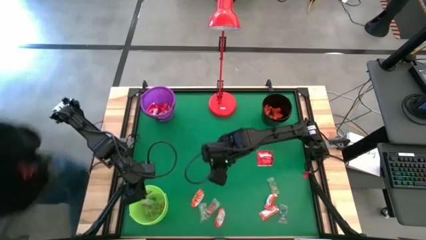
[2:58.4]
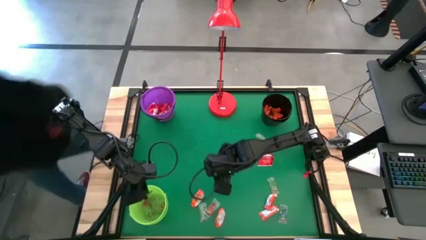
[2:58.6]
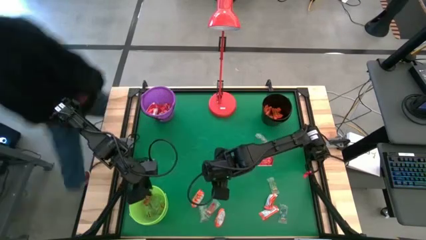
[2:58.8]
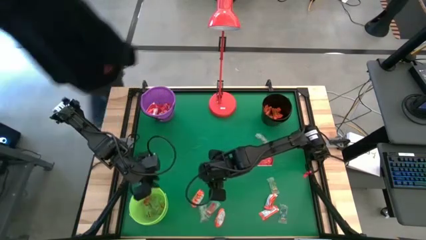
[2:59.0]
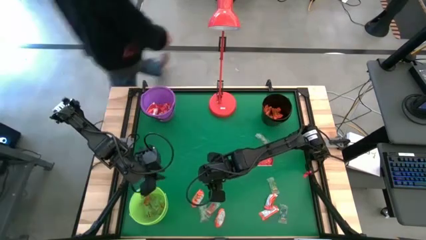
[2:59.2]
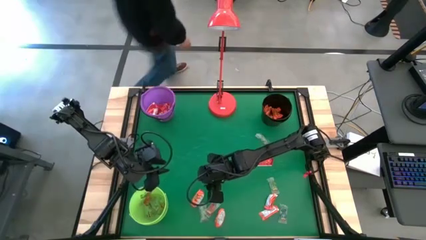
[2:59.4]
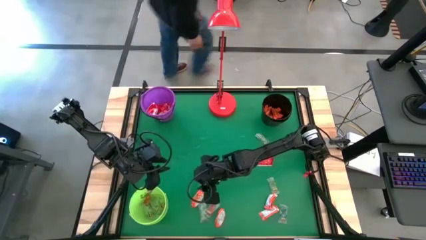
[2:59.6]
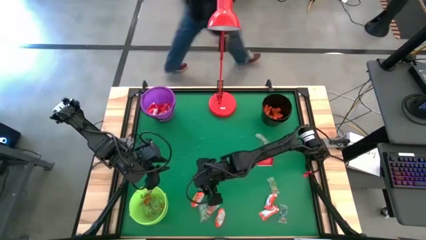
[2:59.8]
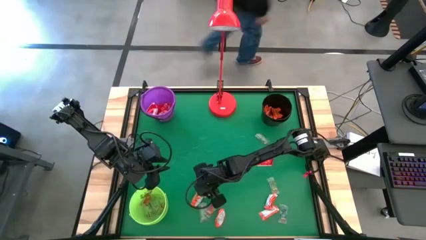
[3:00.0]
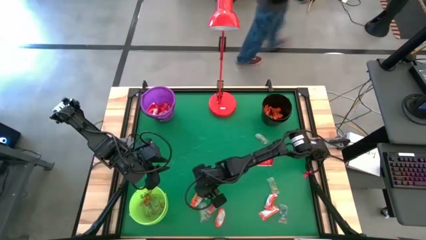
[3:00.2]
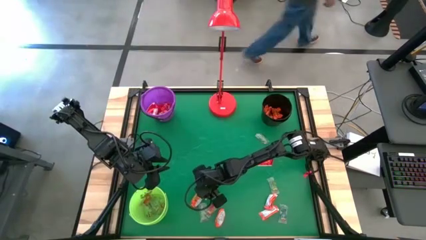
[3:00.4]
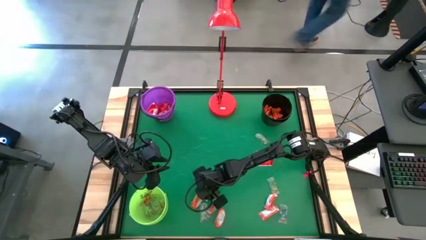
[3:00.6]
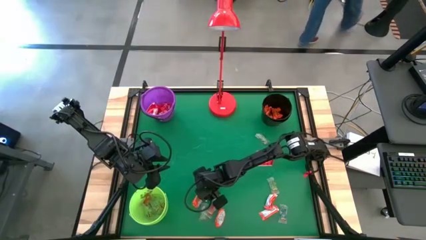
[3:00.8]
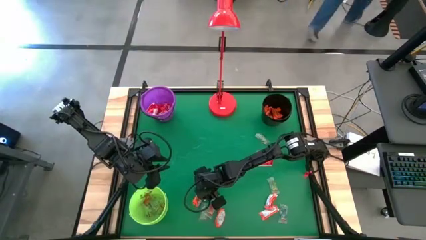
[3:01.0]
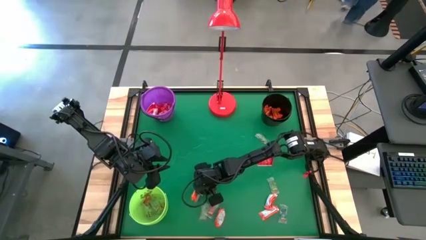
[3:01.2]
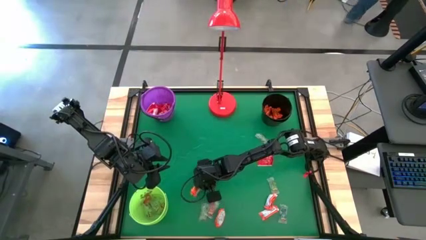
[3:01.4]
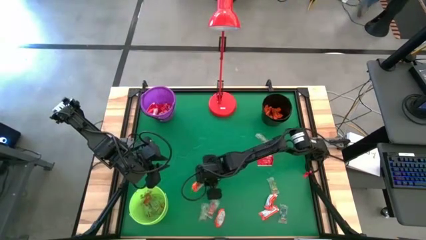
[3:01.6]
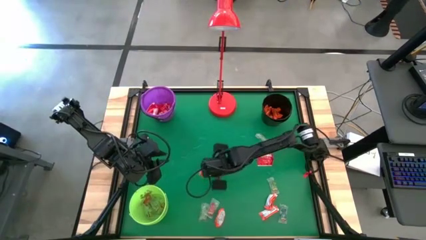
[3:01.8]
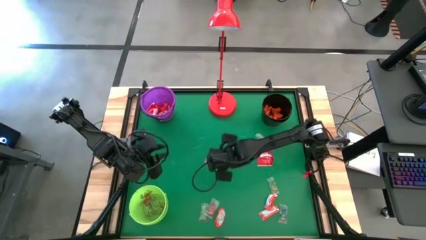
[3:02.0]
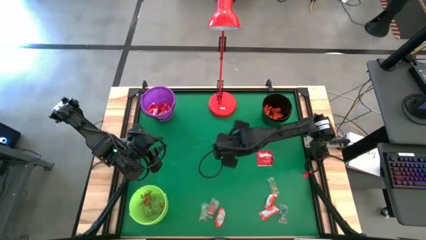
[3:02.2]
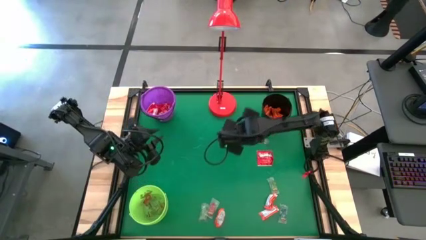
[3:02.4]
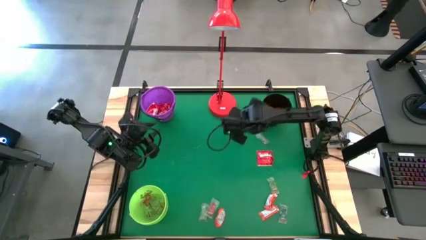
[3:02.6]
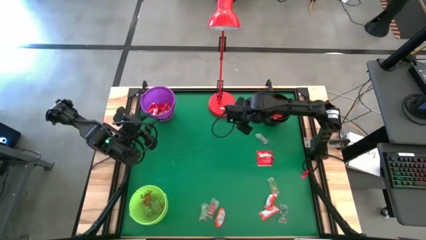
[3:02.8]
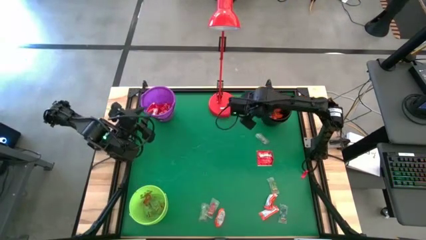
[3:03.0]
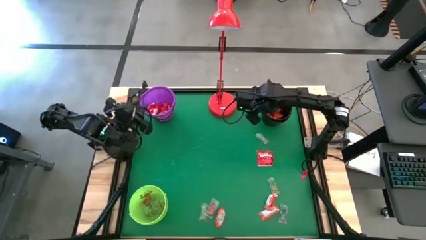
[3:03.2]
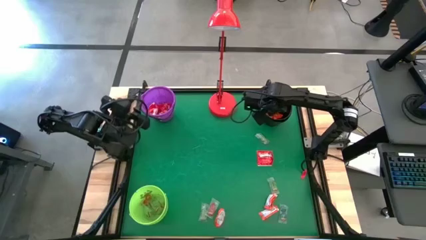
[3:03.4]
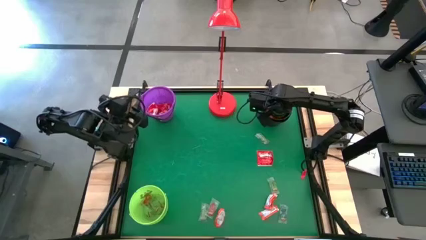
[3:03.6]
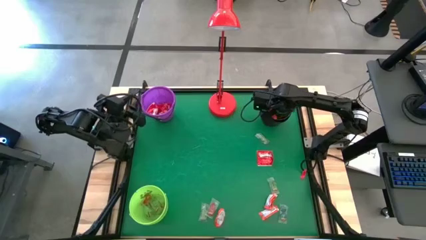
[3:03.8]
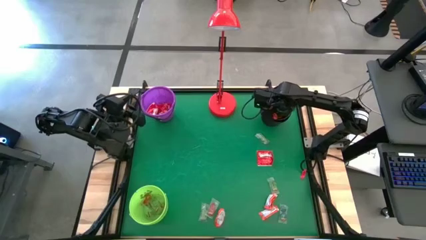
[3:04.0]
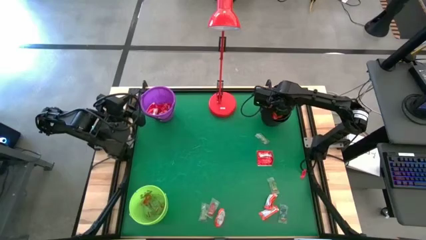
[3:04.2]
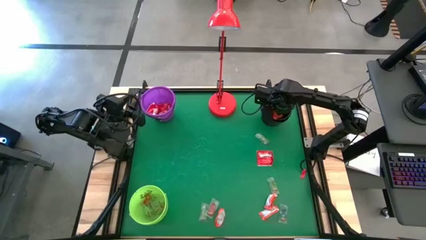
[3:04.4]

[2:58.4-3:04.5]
Task: Sort candy
Put the orange chocolate into the black bucket

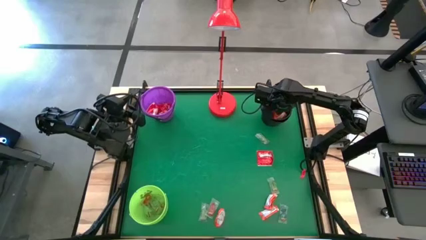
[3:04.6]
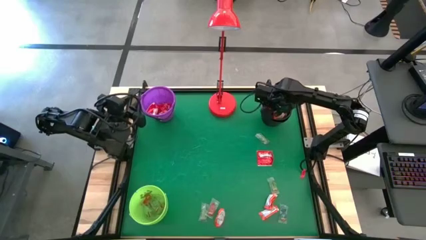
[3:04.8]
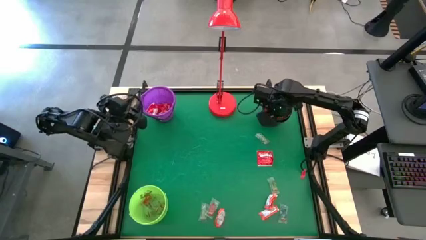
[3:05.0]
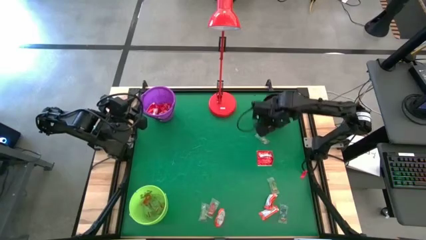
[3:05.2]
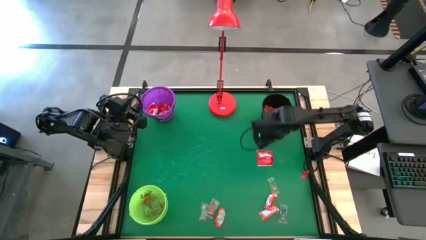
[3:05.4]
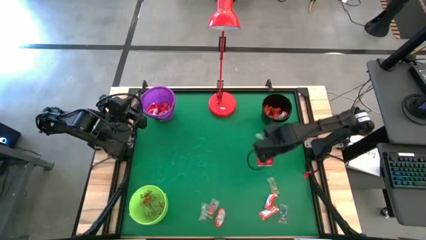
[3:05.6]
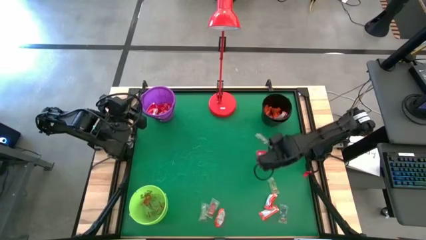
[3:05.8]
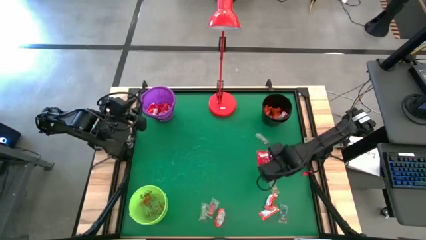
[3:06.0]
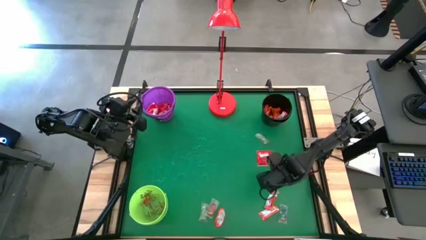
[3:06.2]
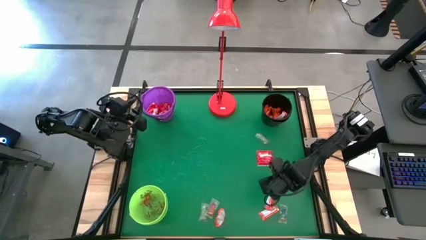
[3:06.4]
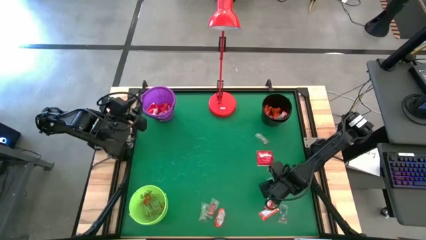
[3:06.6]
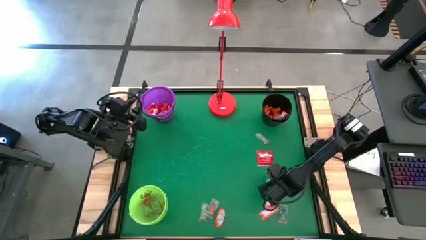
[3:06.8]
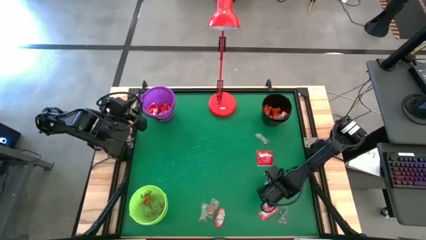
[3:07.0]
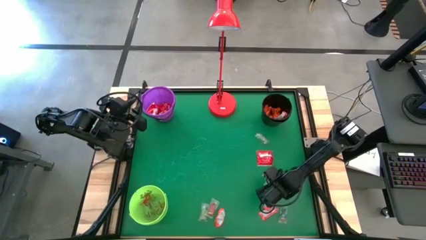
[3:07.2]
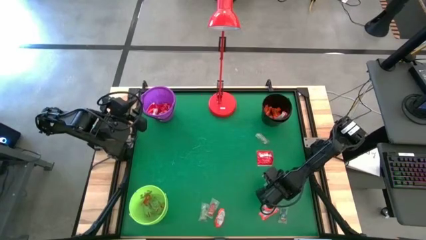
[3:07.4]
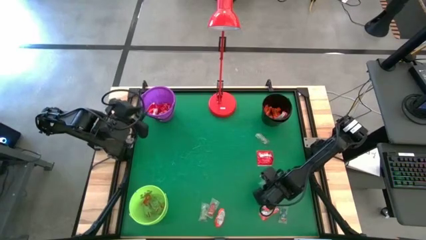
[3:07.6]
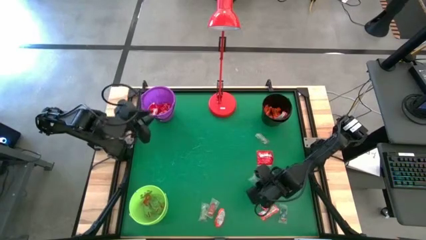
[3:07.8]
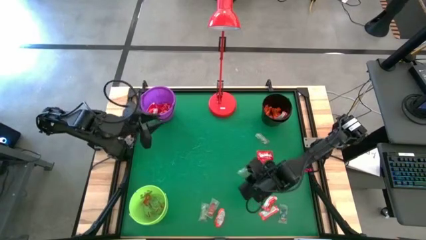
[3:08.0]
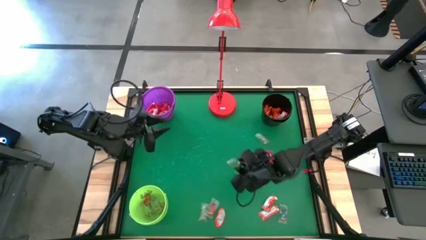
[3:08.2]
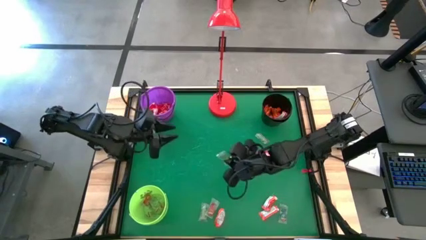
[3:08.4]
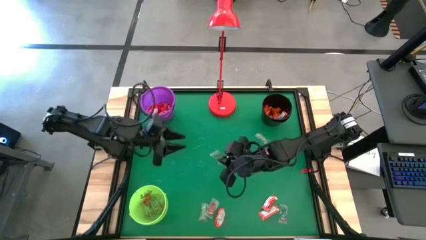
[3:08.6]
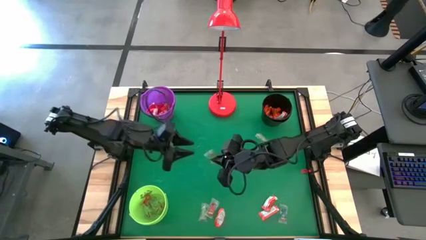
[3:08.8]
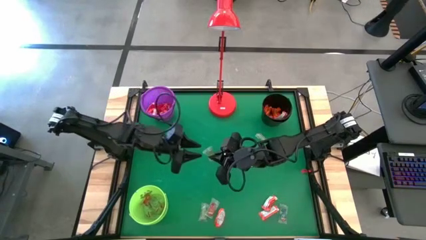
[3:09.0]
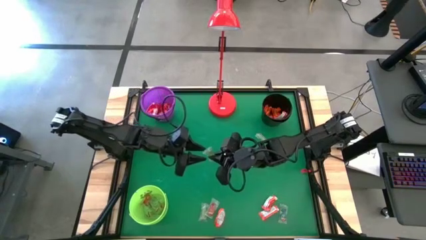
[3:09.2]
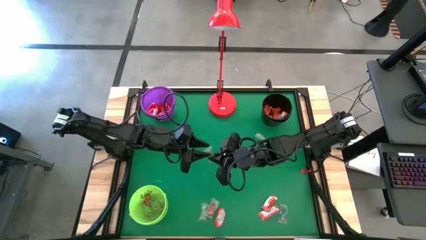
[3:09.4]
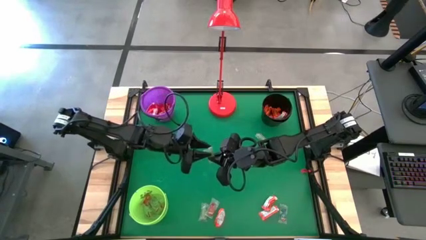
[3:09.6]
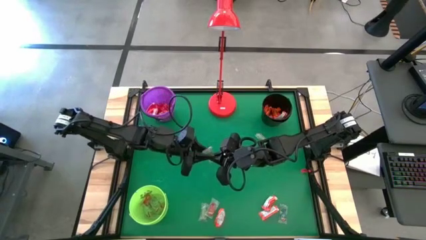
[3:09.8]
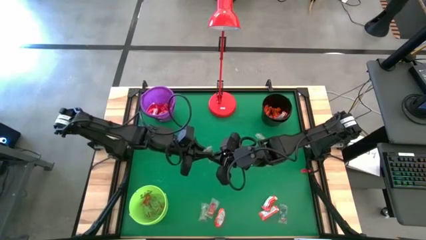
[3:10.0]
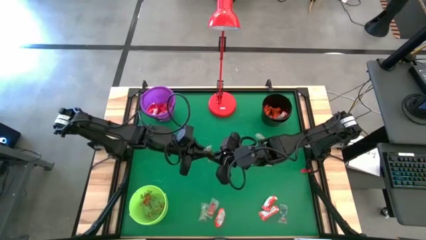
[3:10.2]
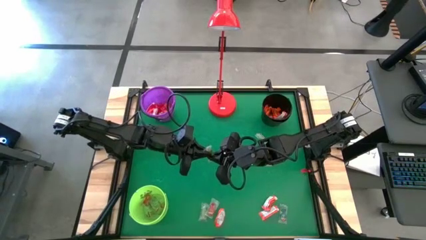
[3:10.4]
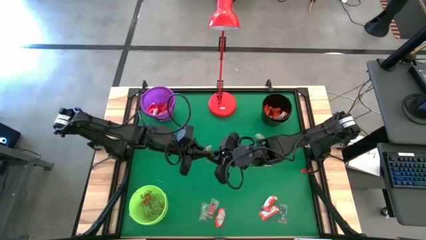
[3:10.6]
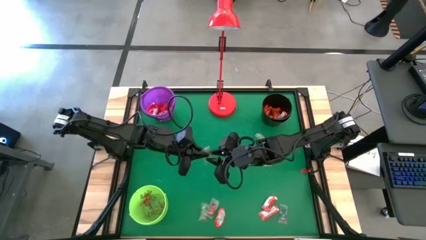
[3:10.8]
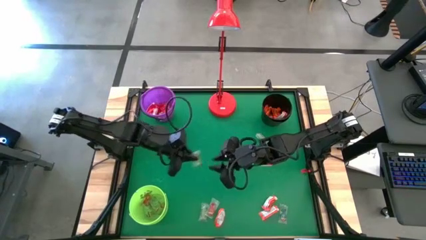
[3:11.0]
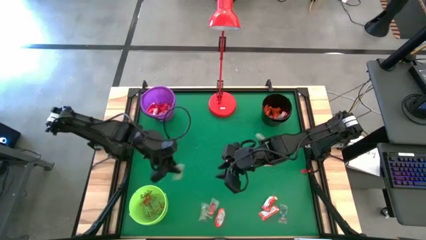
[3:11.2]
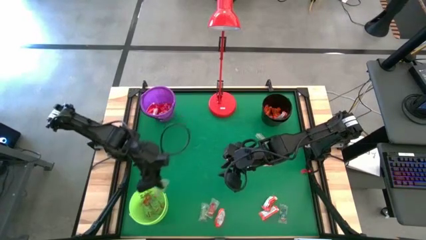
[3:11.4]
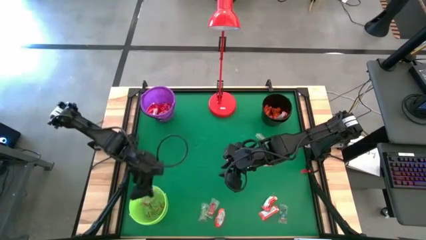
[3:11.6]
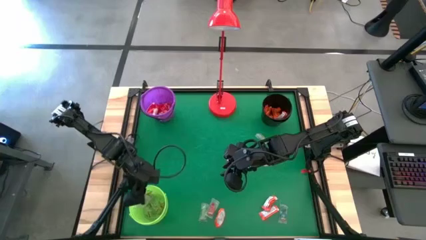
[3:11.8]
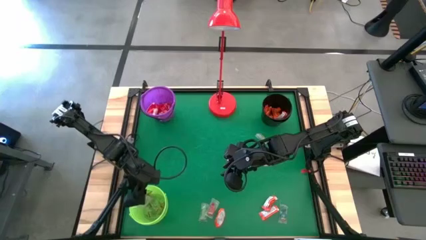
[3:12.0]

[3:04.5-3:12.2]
Put the green gummy into the light green bucket
